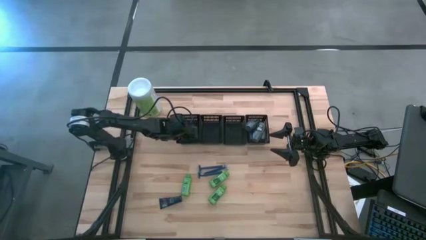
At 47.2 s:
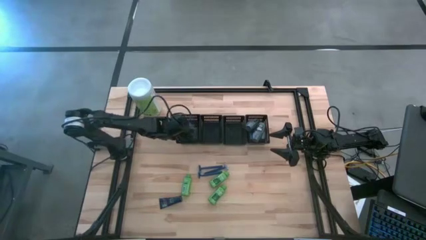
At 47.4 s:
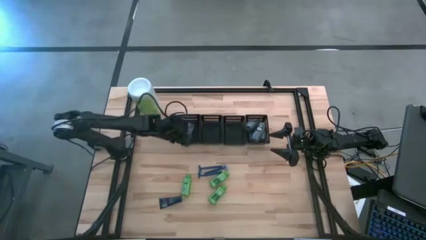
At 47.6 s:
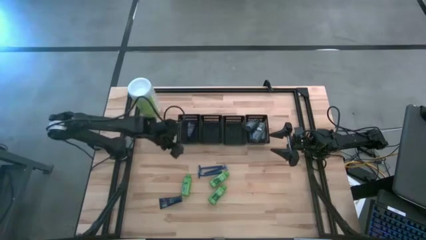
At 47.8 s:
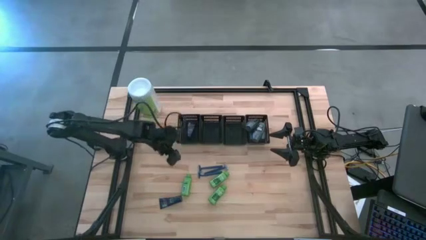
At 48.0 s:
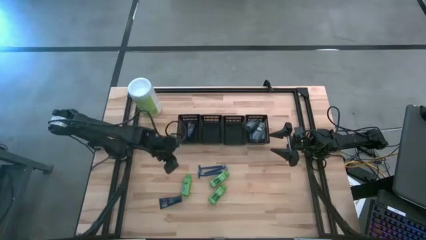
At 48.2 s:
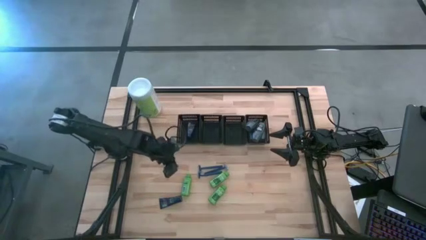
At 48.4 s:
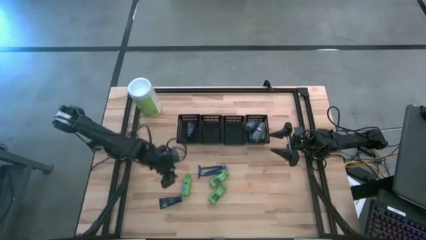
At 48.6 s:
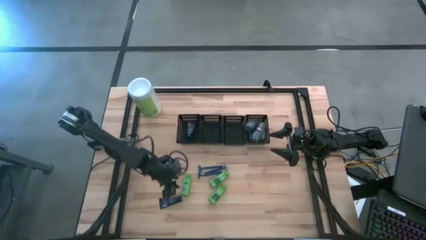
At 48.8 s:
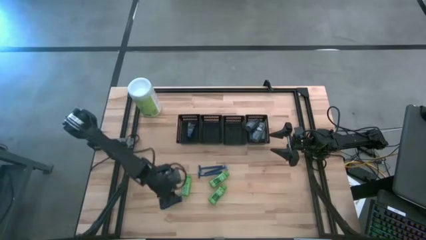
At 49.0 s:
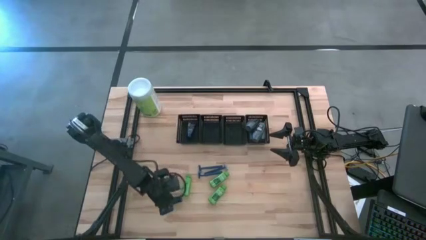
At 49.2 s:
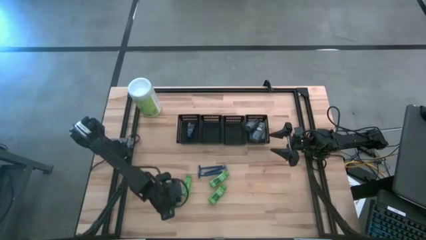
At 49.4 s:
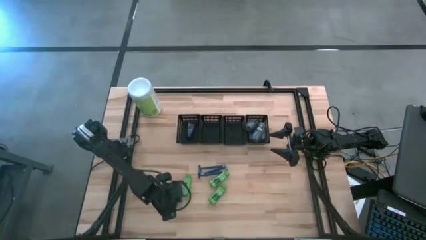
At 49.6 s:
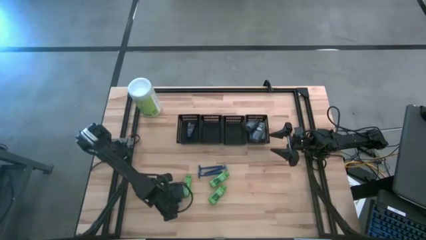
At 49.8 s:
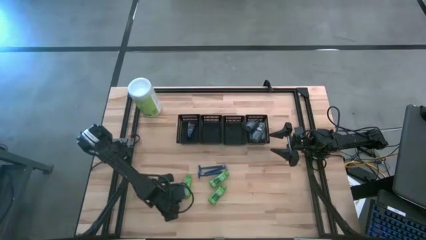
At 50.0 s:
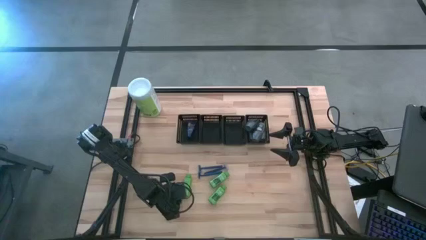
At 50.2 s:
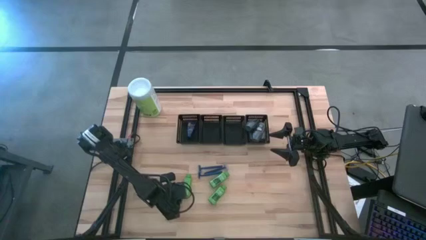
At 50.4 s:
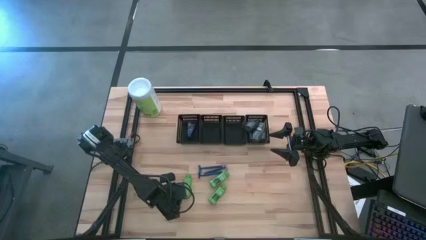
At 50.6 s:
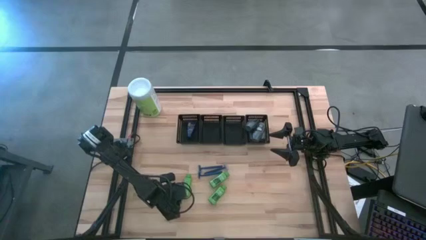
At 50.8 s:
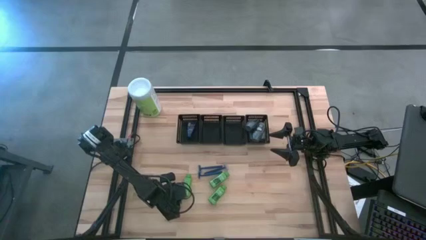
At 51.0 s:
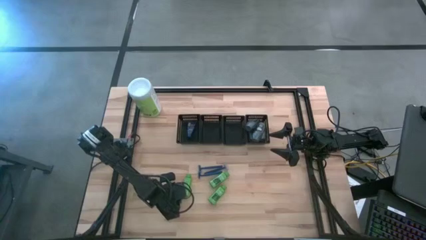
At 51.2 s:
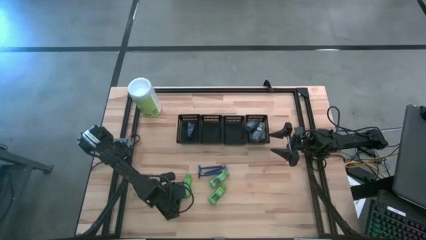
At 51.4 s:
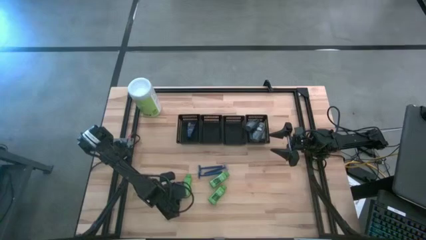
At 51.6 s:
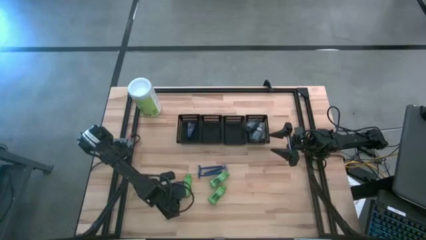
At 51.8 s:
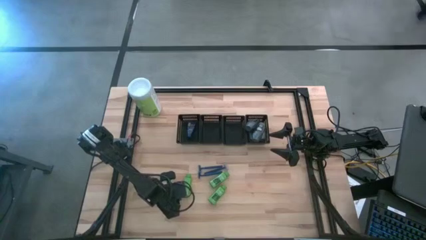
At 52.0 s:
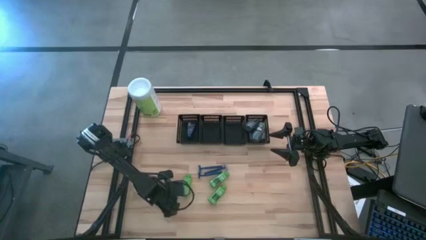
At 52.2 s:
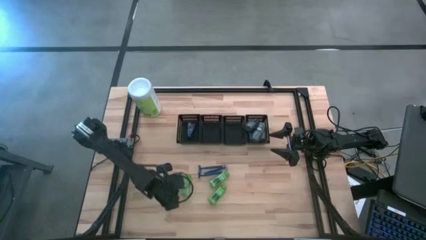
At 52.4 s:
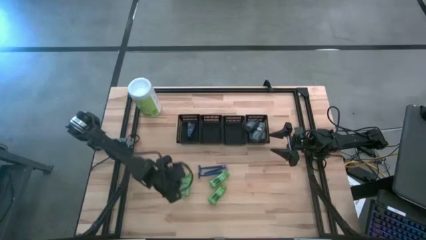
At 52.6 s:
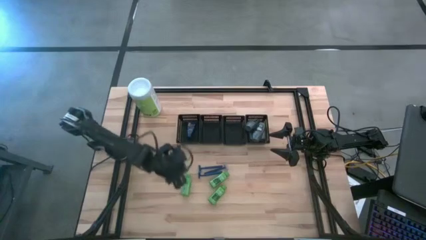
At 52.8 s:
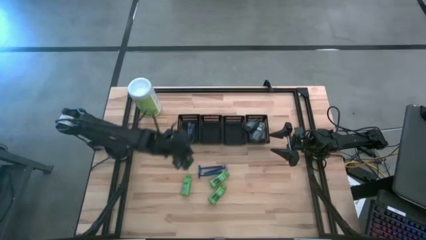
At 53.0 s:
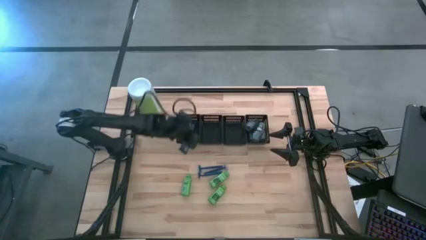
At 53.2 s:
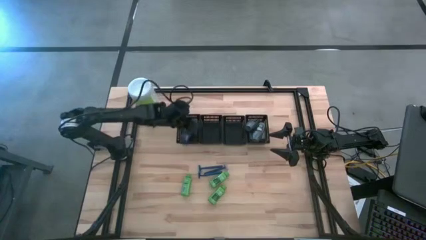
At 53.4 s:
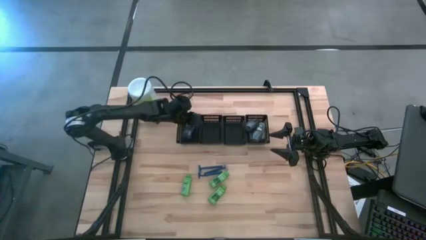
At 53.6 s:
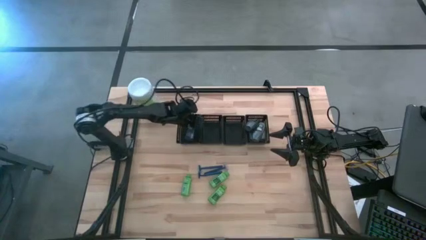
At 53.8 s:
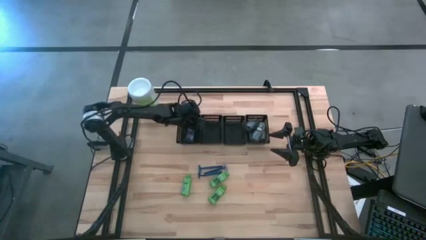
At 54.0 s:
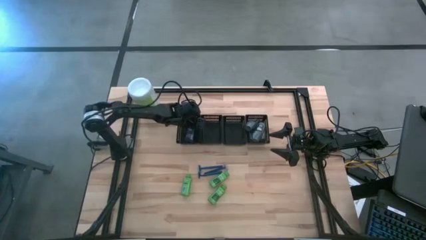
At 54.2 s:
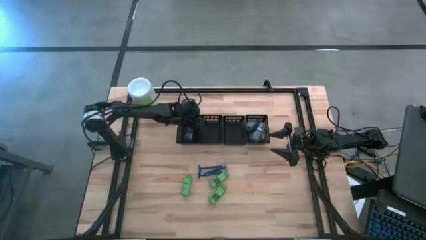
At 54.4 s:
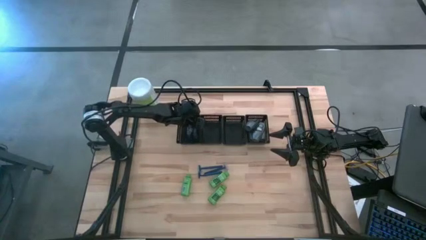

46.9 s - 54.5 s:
Task: Pick & Place Travel size toiletries
Put the blue shave cream into the left black bin

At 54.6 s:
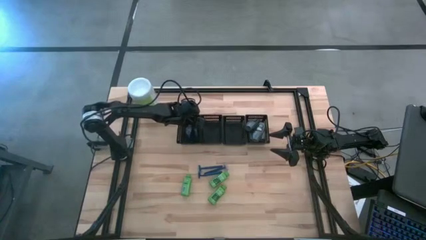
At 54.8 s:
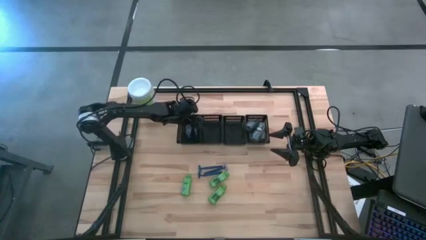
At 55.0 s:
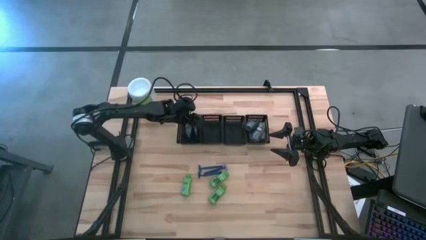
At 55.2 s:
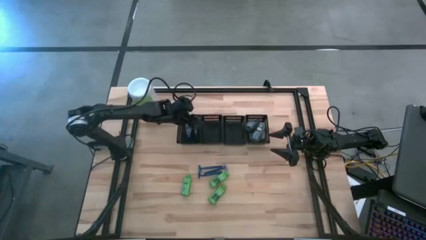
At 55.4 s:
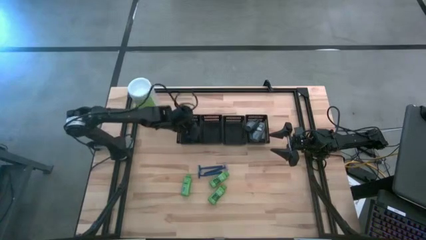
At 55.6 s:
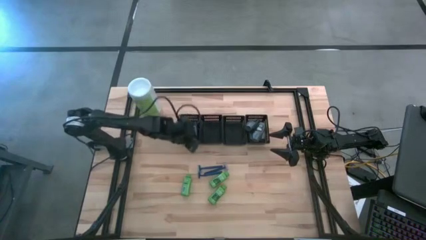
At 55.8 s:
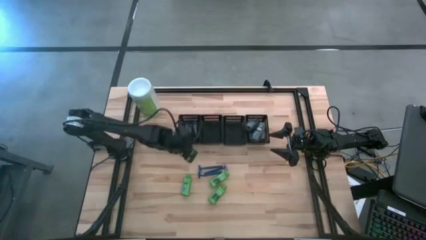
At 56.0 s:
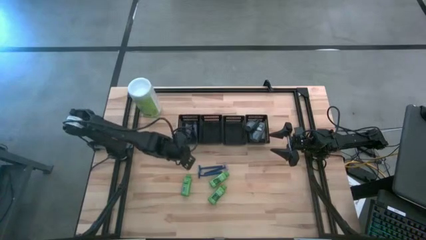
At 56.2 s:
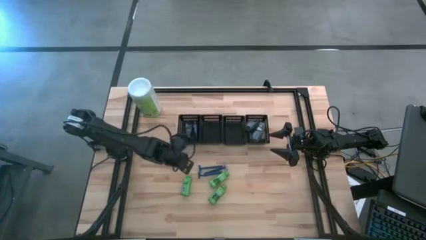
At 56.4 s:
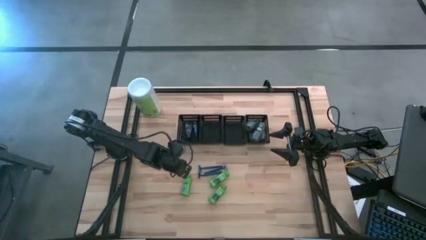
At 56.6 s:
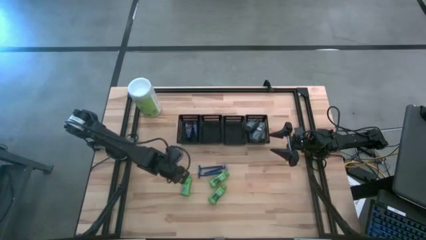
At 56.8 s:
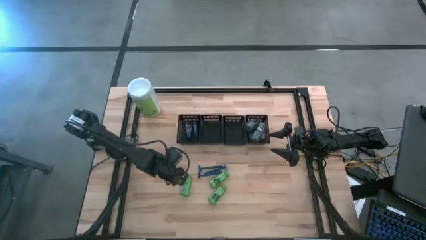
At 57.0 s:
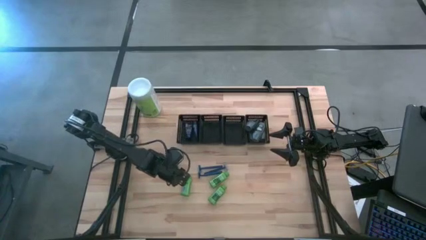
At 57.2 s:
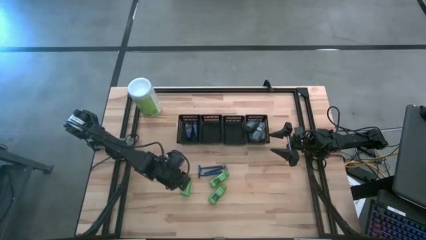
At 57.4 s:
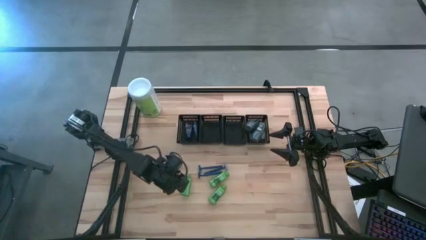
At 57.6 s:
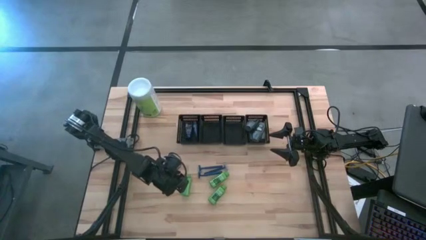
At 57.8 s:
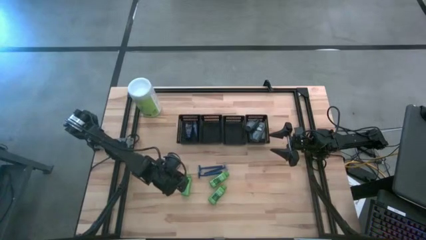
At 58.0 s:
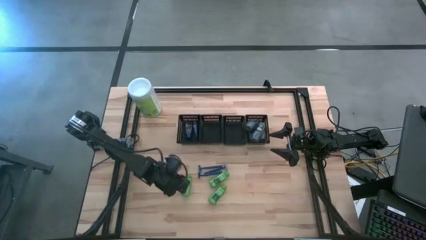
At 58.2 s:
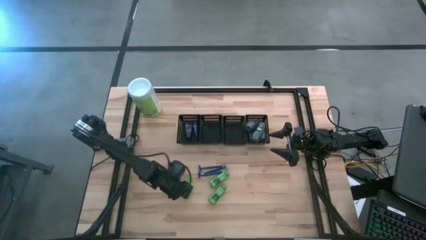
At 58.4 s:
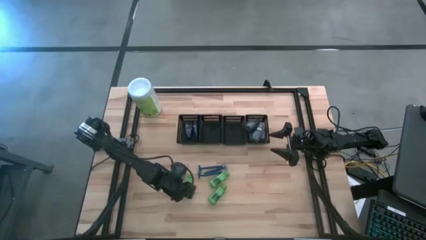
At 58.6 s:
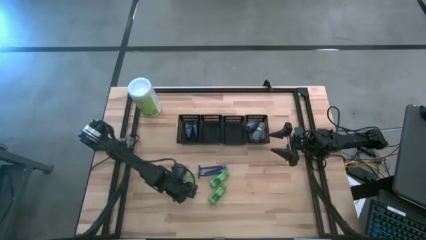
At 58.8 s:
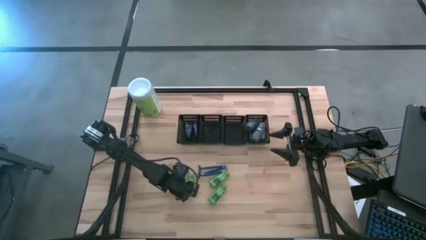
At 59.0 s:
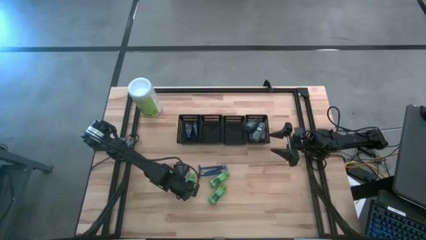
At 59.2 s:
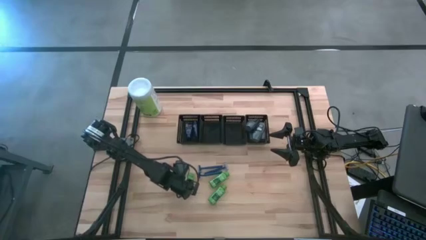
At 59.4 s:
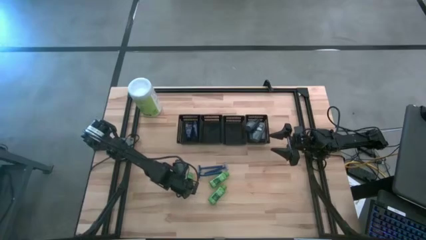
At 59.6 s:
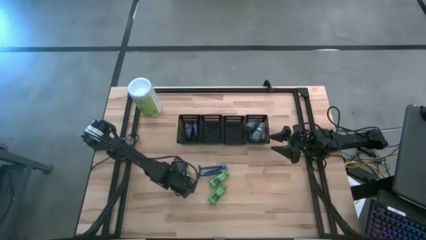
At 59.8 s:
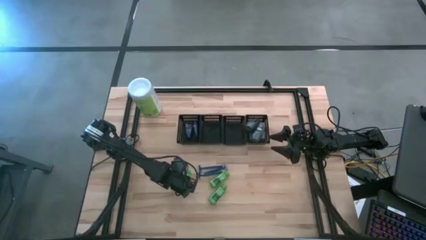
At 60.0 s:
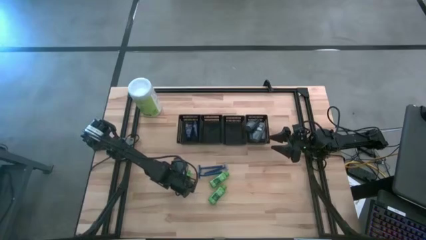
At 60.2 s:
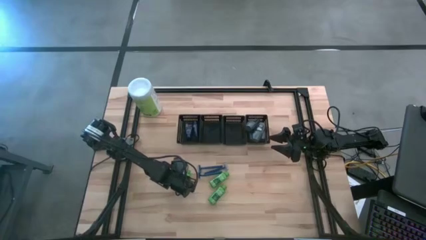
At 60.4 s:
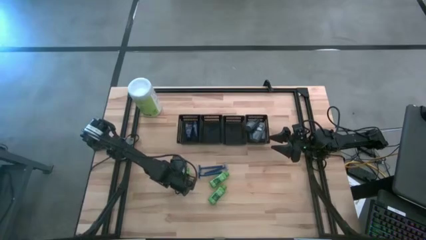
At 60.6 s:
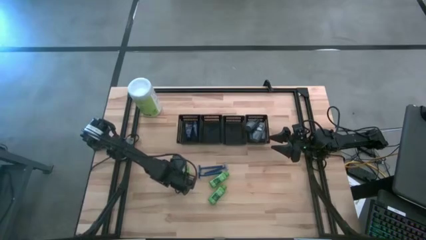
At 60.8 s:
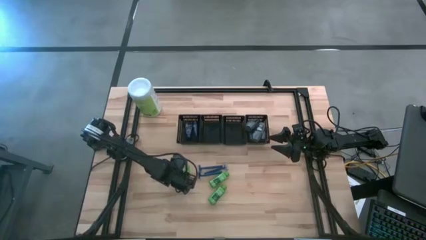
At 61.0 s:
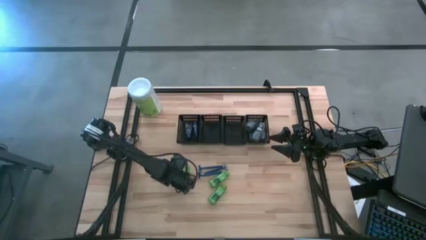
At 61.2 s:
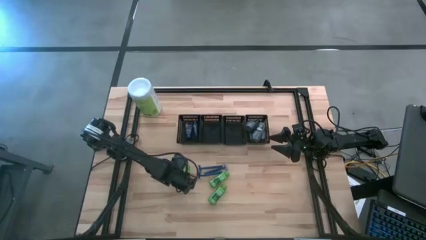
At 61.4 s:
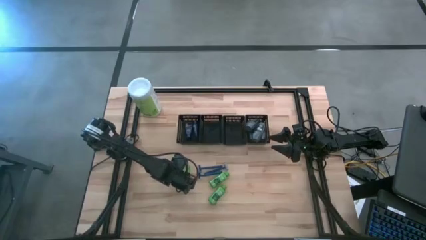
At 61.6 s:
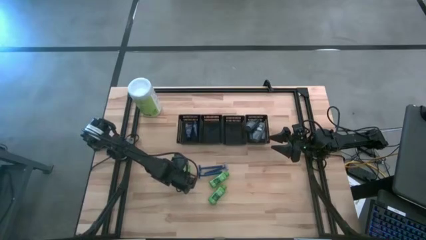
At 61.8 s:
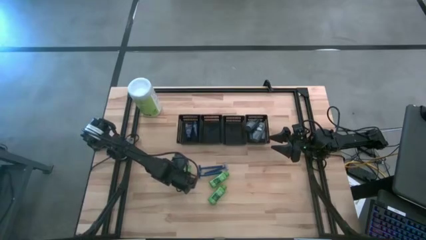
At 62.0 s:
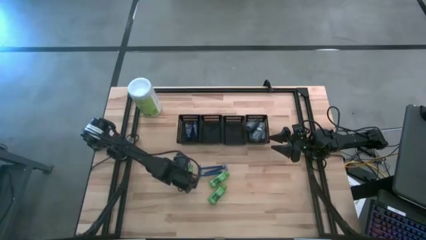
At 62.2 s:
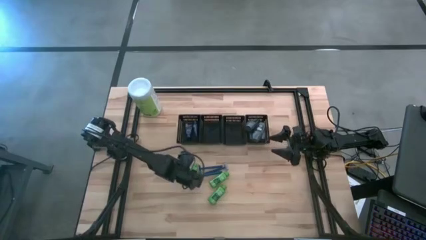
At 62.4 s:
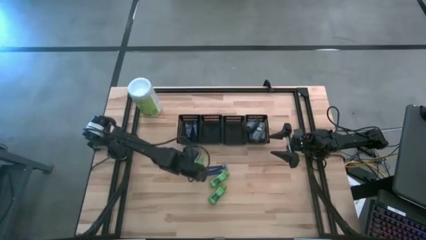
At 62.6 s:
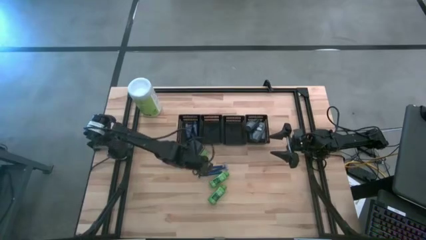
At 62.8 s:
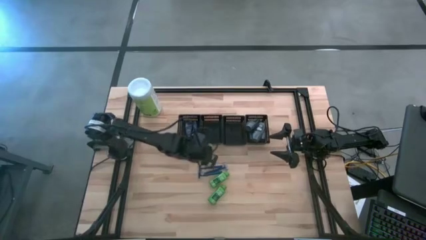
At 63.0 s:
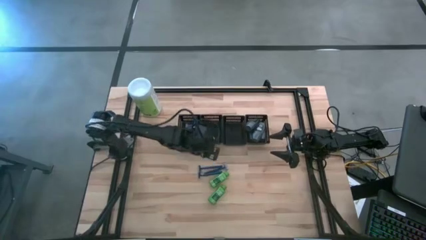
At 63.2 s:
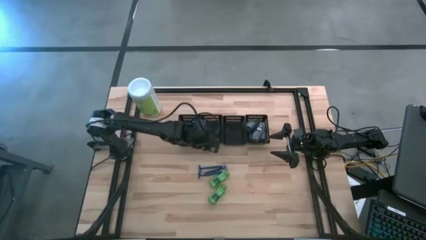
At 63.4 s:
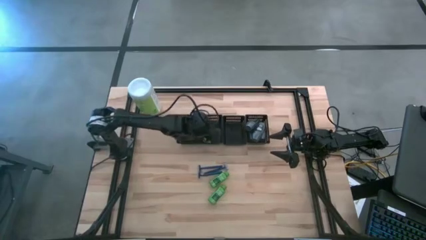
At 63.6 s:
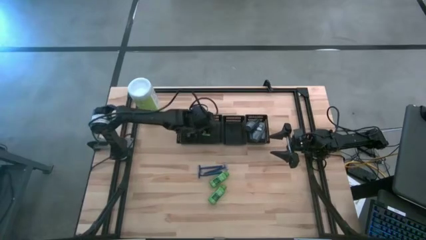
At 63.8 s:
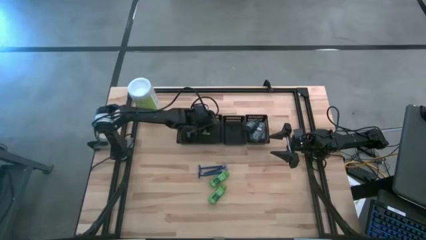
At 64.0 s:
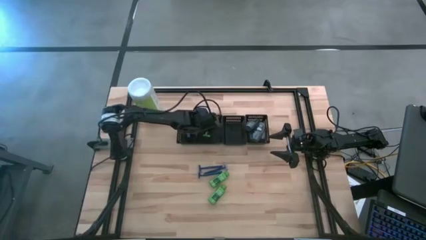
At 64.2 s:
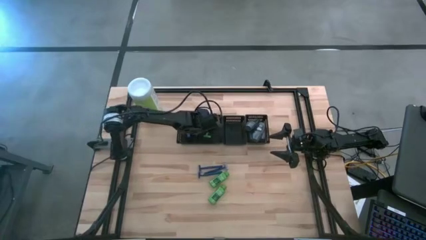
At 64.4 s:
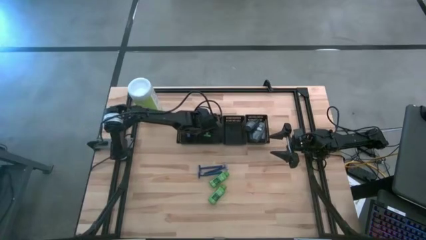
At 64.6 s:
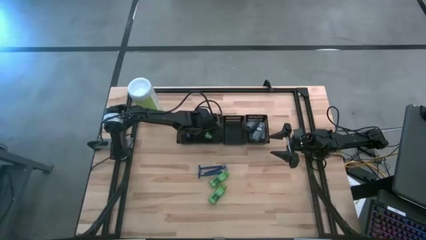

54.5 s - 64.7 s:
Put the green shampoo into the middle left black bin
